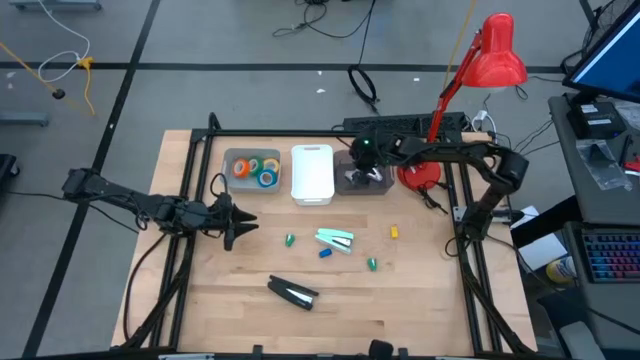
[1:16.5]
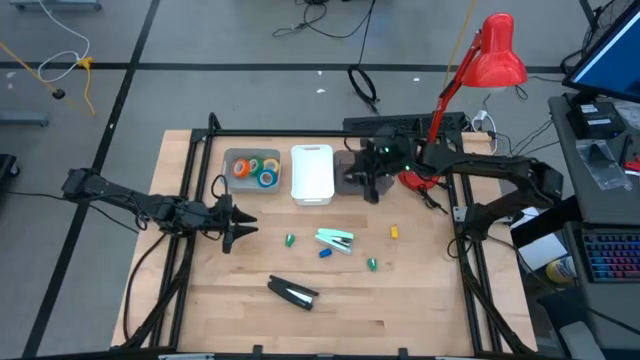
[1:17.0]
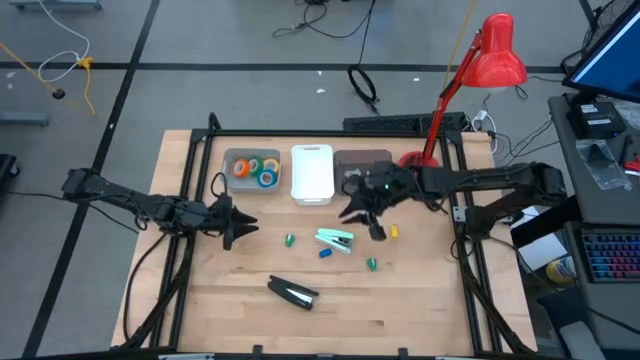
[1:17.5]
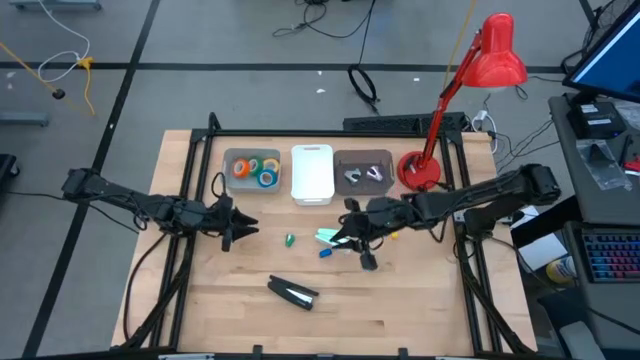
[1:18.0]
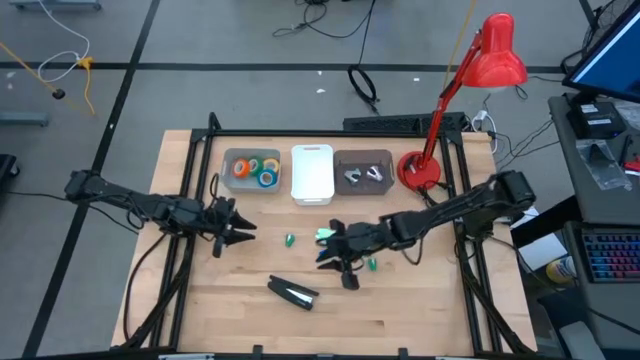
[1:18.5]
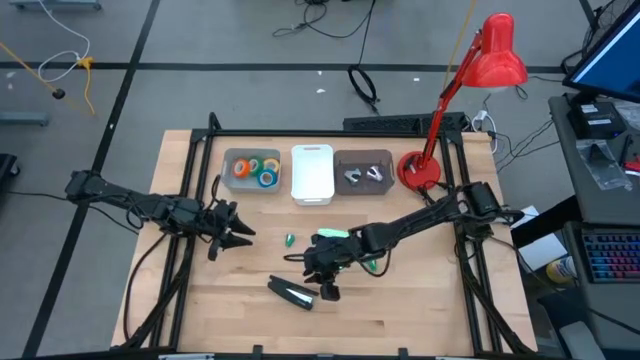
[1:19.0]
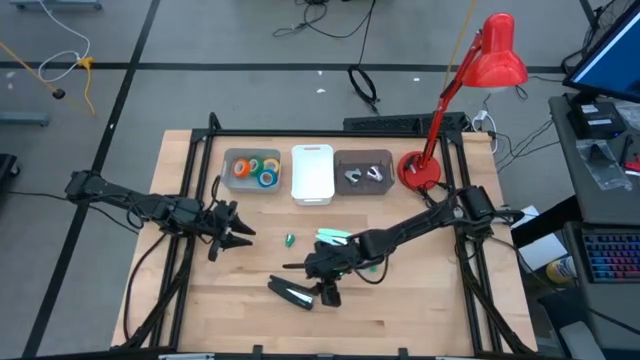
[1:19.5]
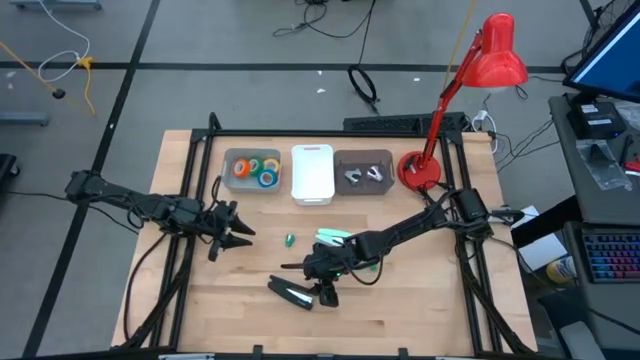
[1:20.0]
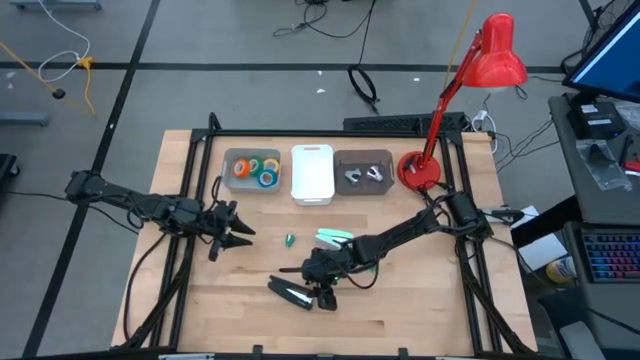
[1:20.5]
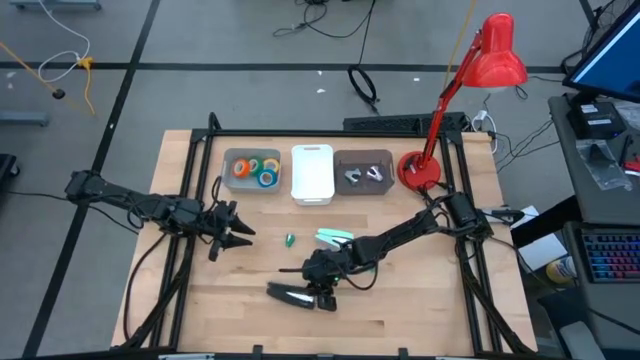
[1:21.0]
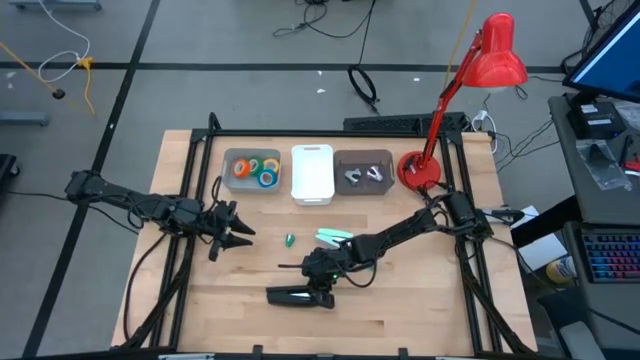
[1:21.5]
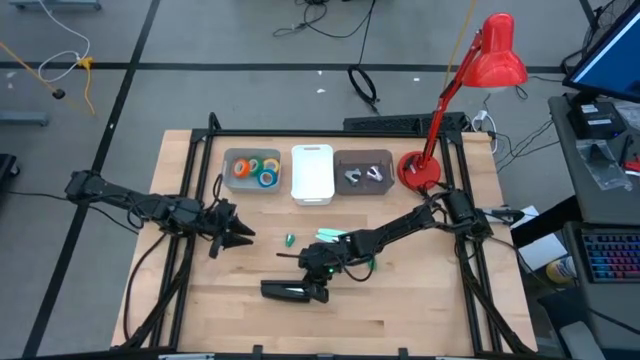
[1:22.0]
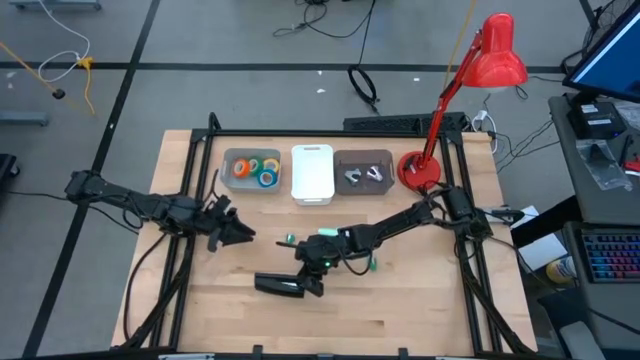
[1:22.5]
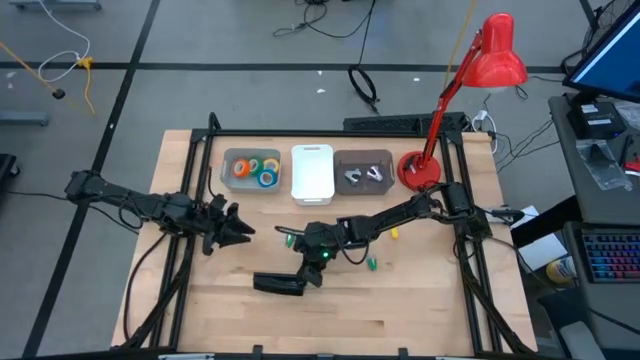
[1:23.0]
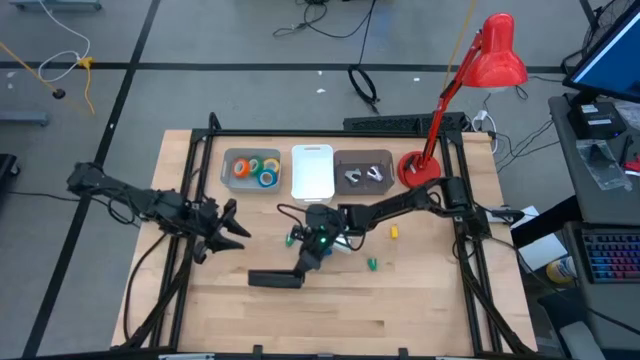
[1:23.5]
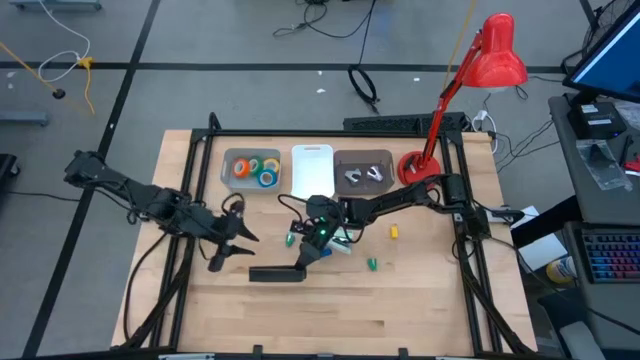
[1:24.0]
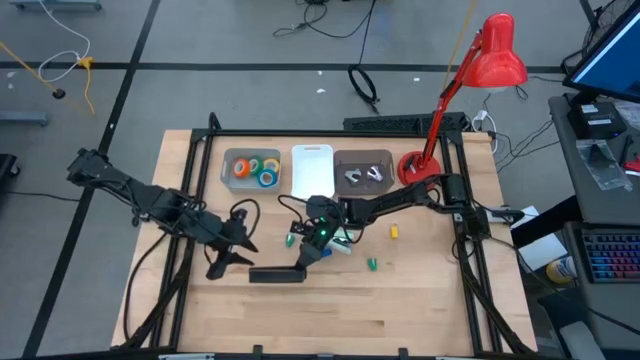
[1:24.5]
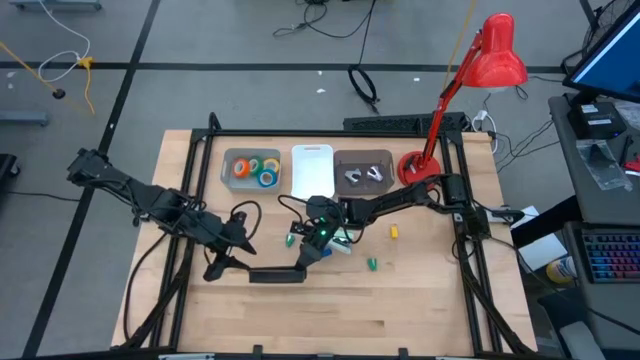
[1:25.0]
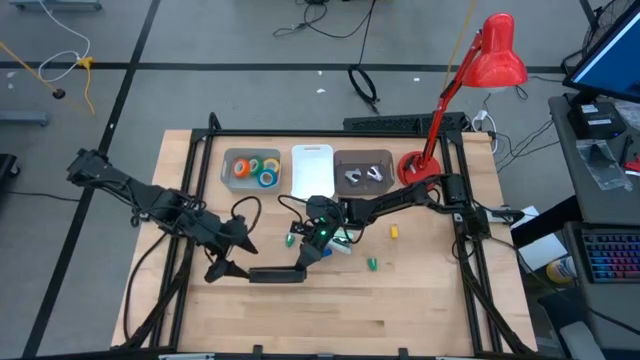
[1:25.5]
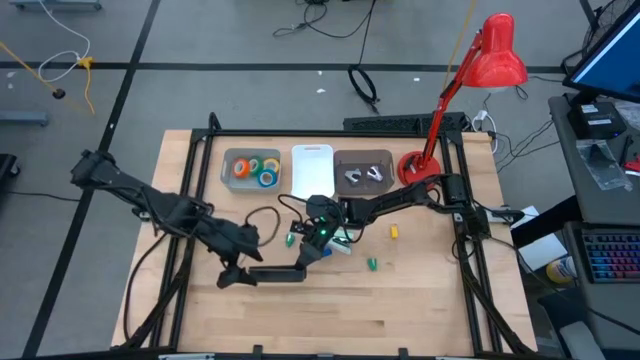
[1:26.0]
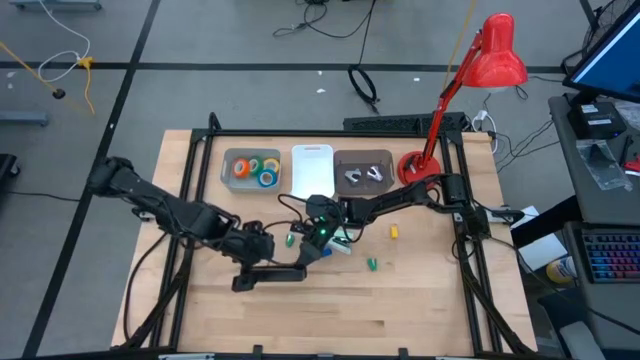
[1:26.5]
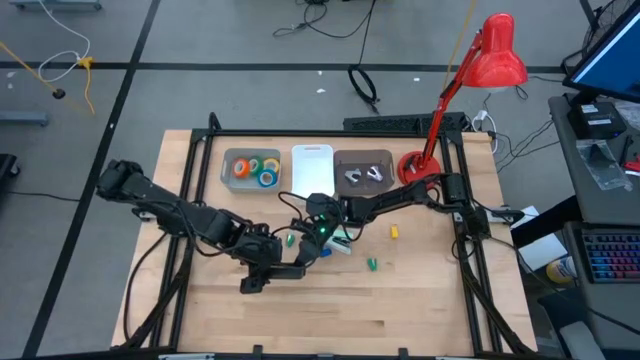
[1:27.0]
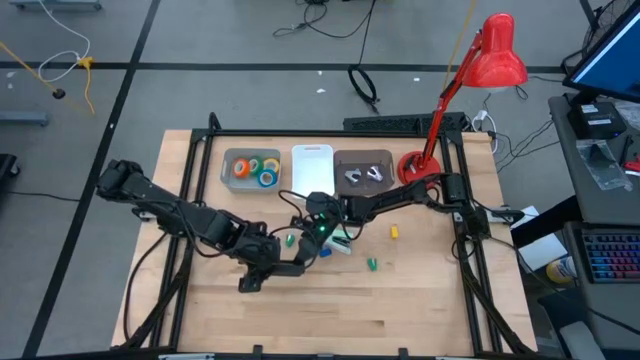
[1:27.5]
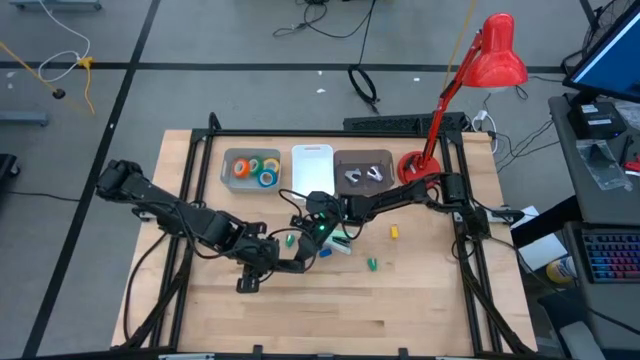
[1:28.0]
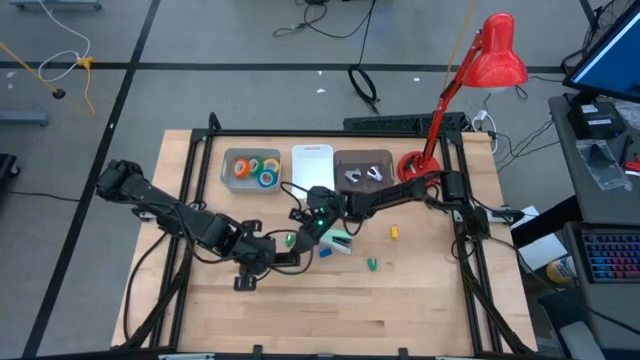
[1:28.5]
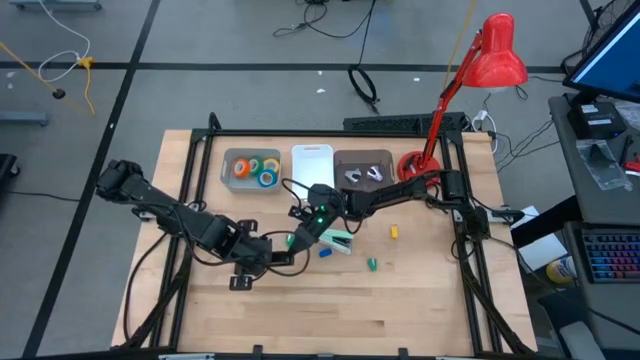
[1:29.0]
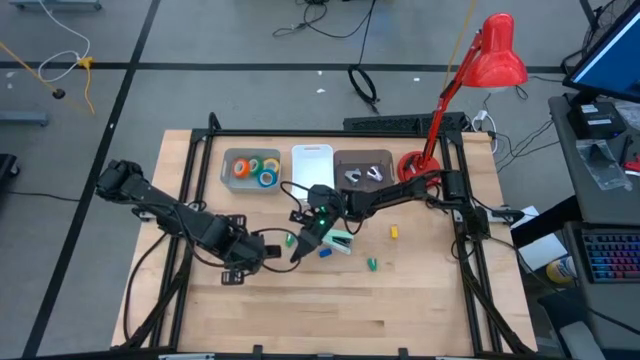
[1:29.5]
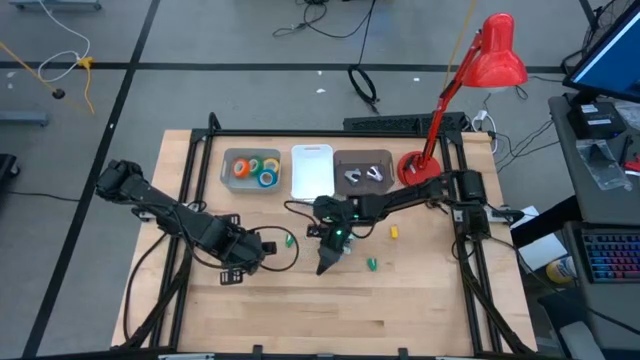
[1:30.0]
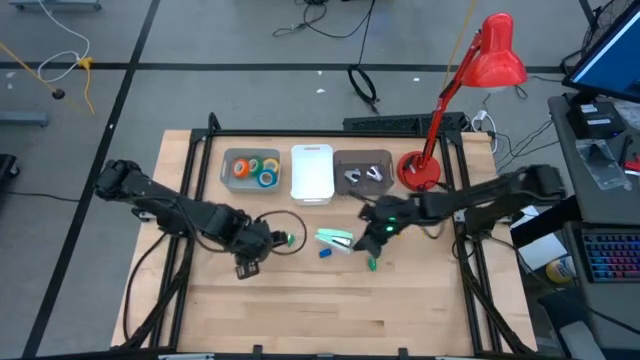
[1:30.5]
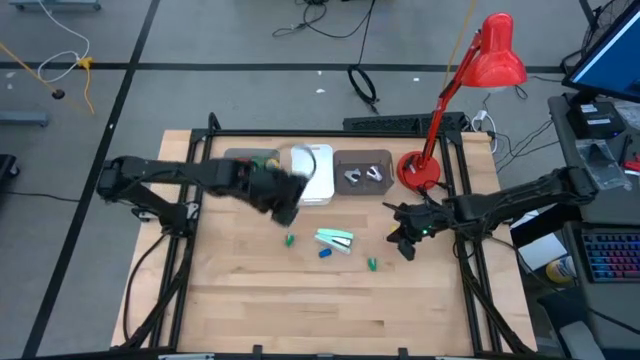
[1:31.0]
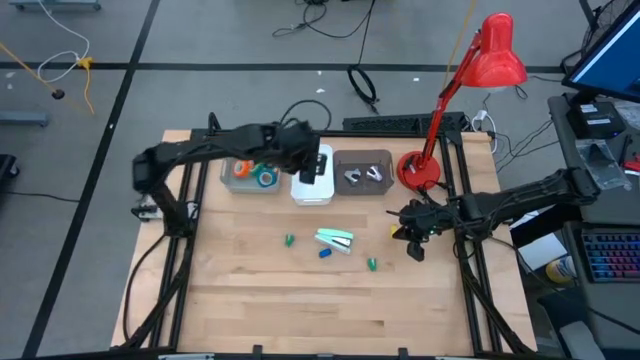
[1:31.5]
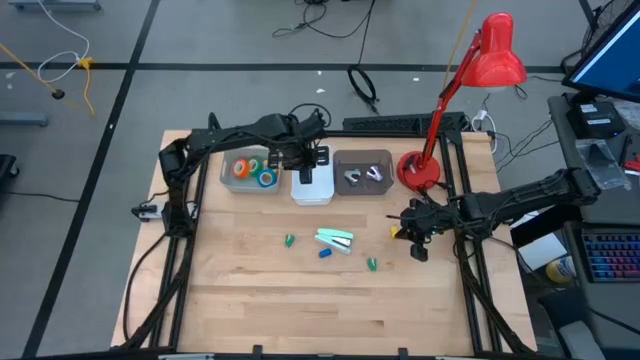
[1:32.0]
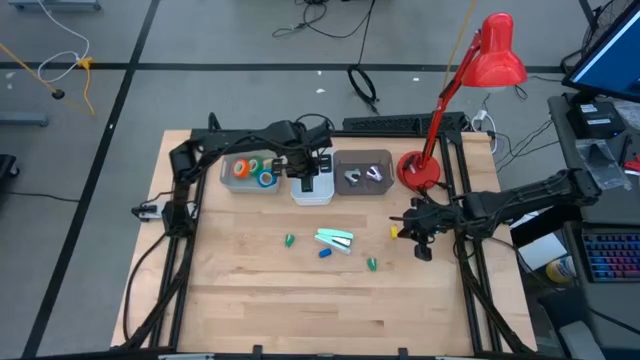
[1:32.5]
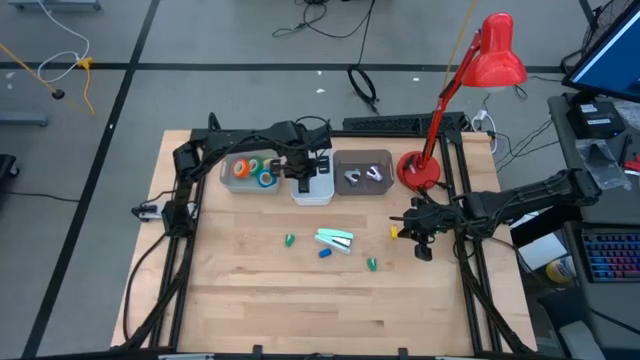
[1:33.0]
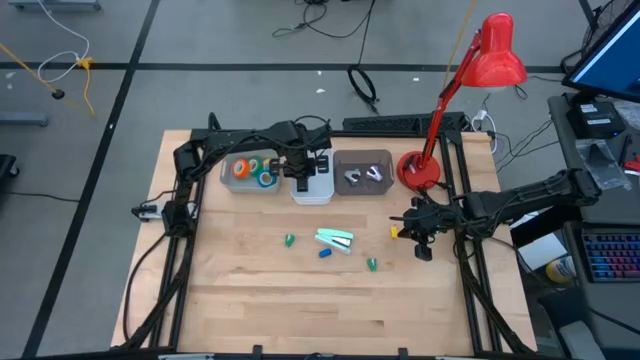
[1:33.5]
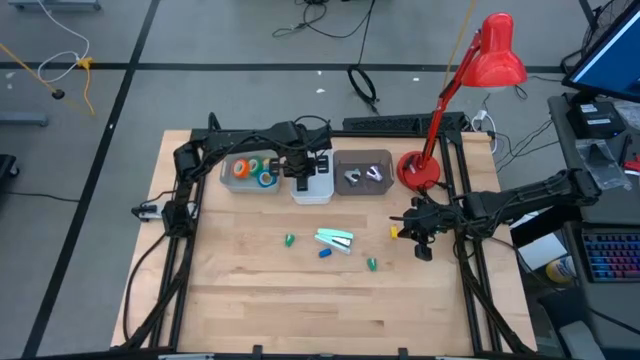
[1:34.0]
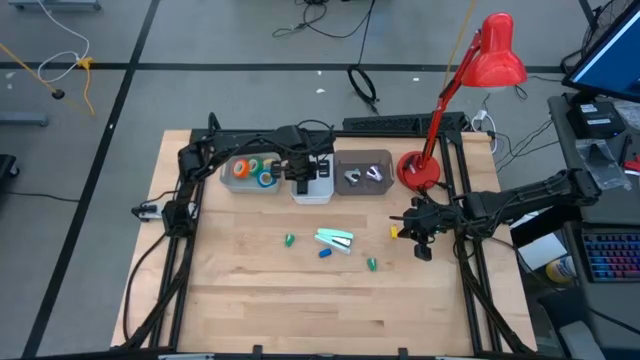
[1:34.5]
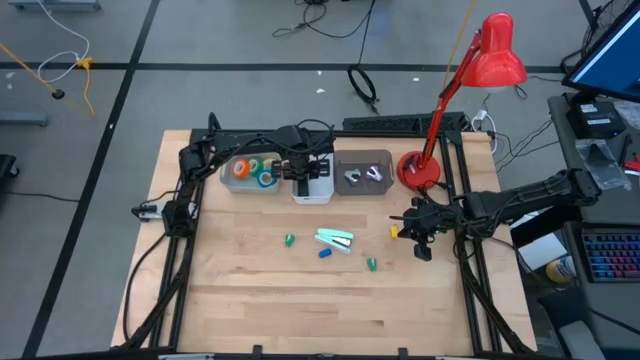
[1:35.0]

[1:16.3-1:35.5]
Task: Pick and place Stapler, Stapler remover, tape
Put the black stapler into the white bin

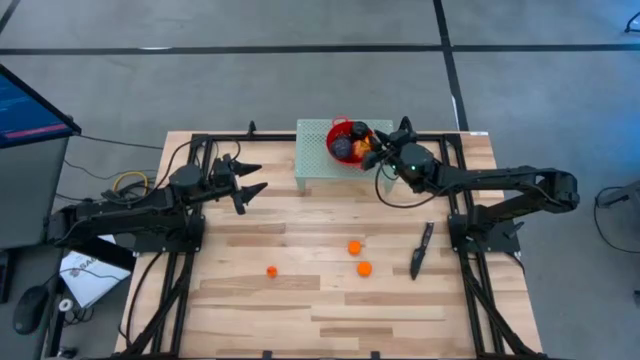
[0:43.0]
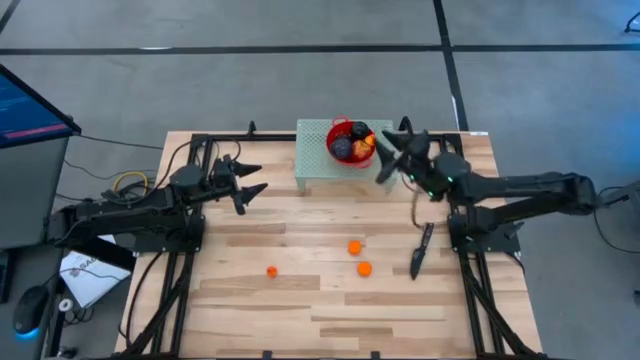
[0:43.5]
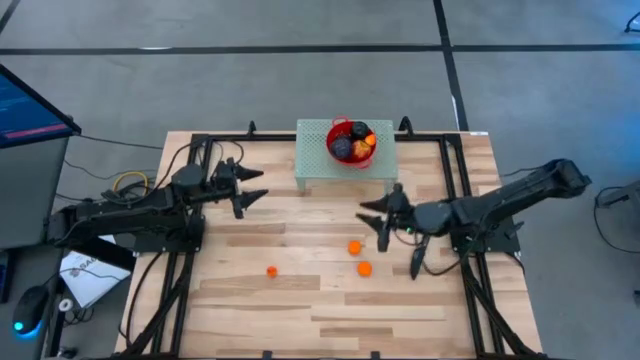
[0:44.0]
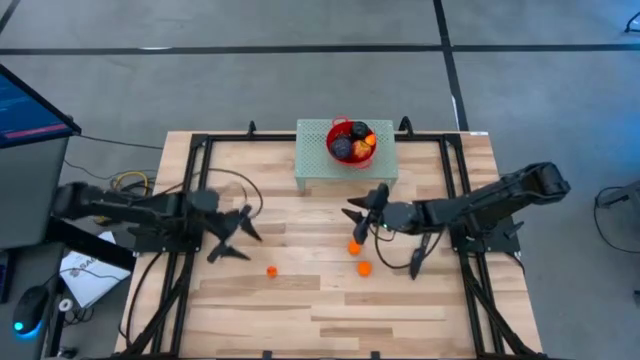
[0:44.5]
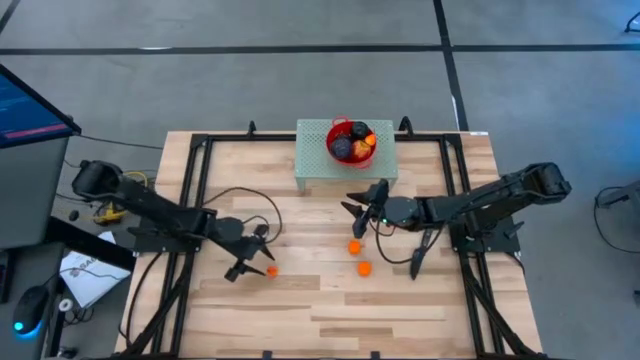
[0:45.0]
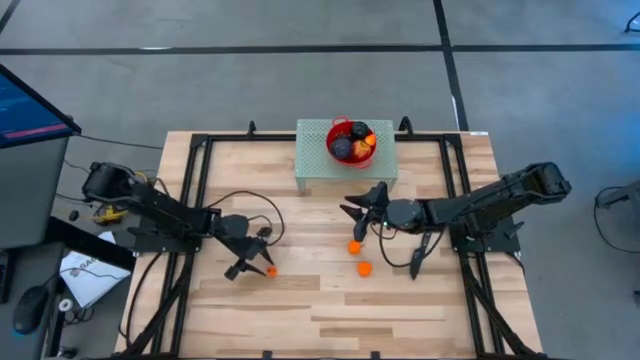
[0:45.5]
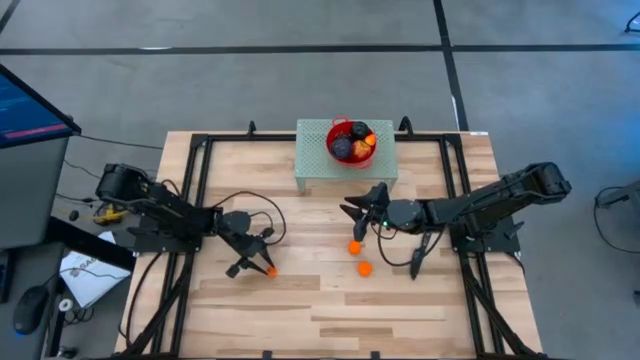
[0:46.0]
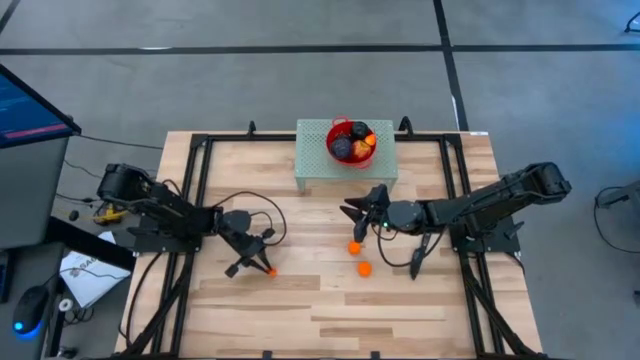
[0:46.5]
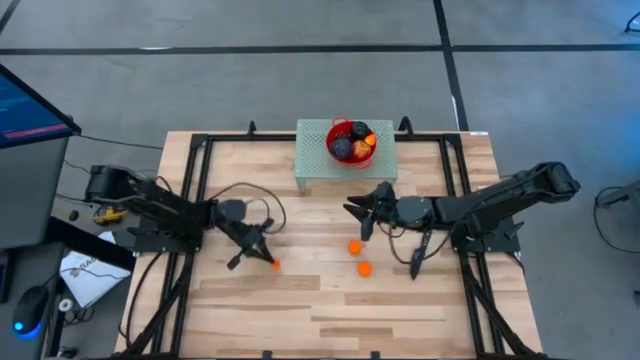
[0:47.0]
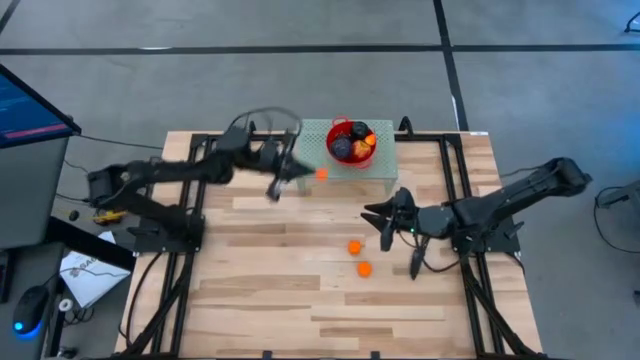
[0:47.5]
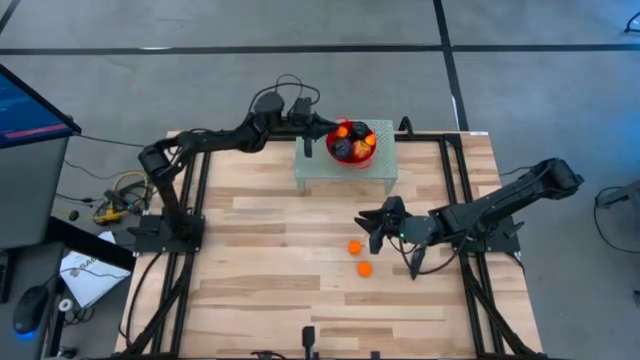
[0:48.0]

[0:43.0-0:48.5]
Task: Pick & Place Fruit
Put the orange pear into the red strainer bowl on the shelf
